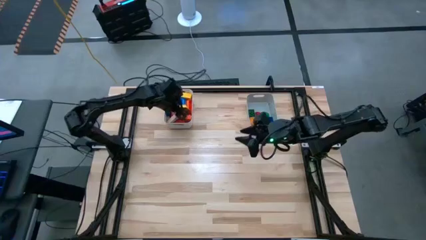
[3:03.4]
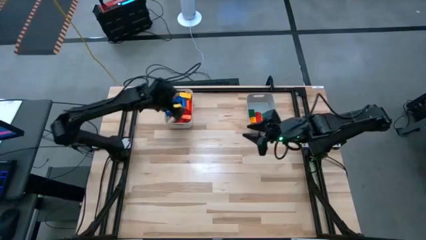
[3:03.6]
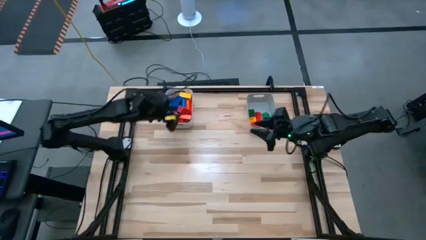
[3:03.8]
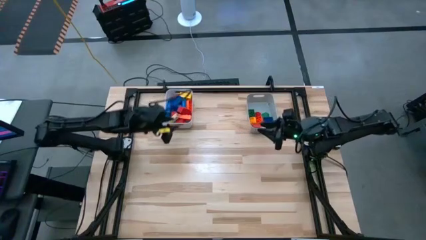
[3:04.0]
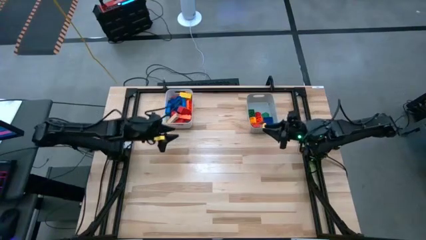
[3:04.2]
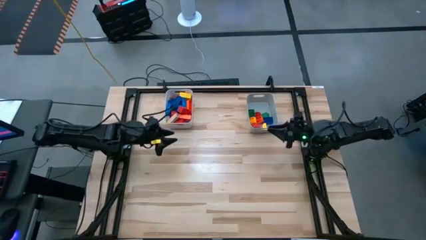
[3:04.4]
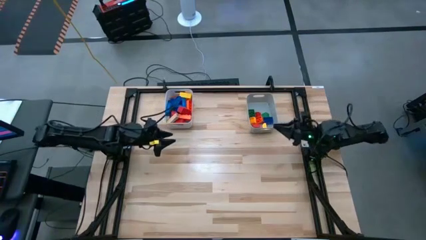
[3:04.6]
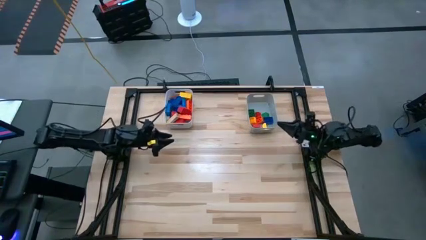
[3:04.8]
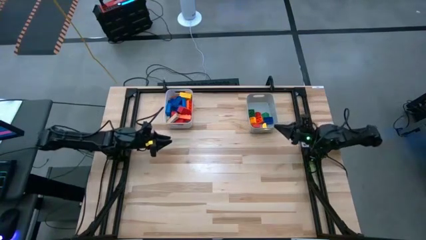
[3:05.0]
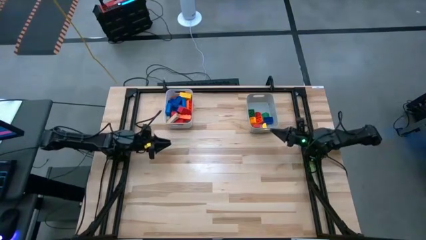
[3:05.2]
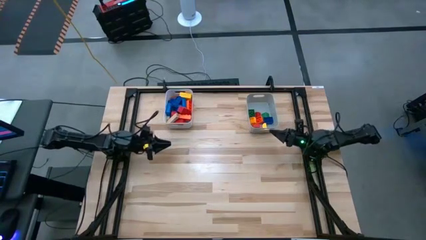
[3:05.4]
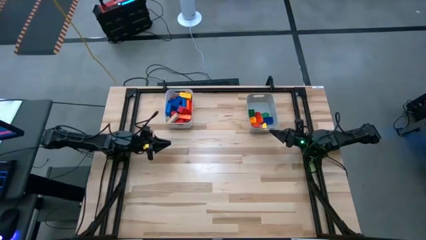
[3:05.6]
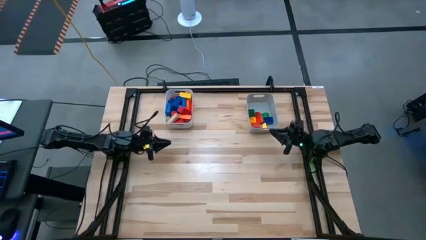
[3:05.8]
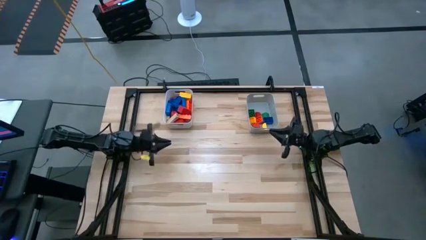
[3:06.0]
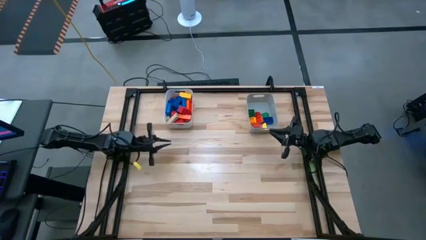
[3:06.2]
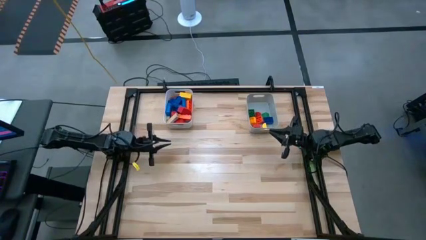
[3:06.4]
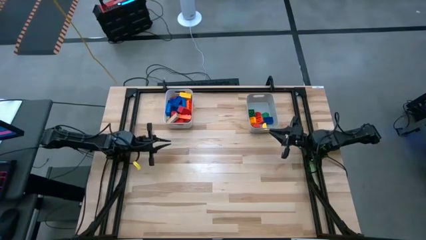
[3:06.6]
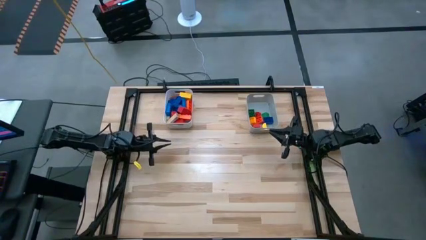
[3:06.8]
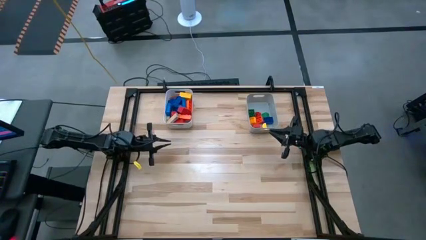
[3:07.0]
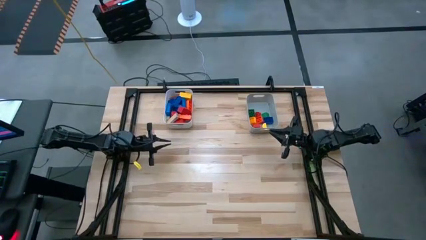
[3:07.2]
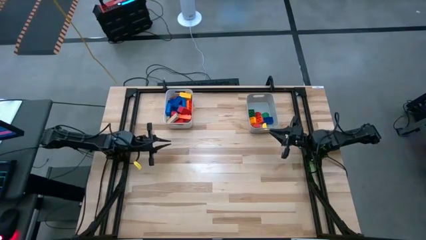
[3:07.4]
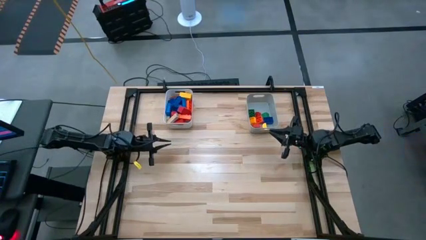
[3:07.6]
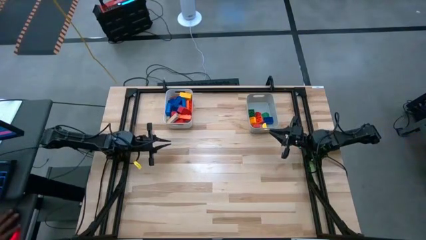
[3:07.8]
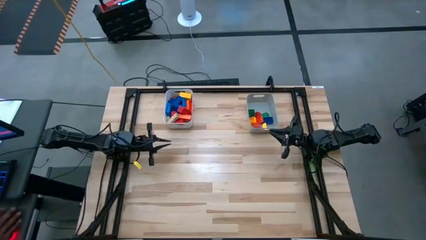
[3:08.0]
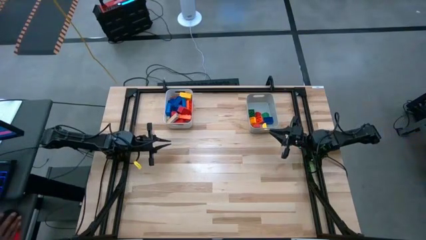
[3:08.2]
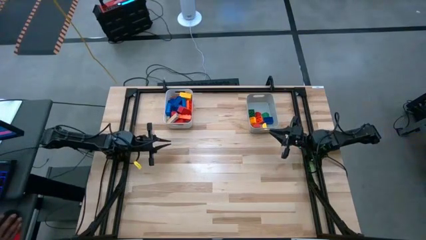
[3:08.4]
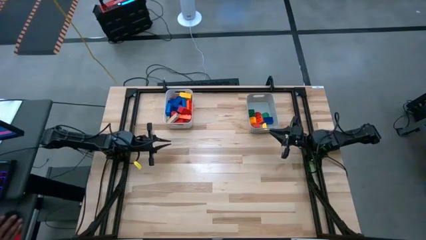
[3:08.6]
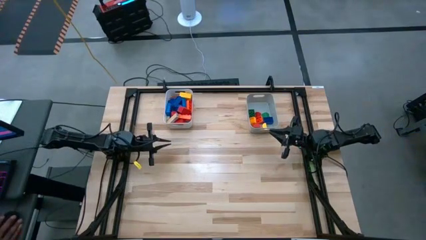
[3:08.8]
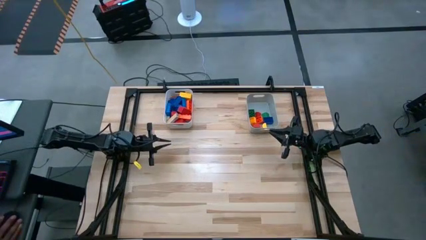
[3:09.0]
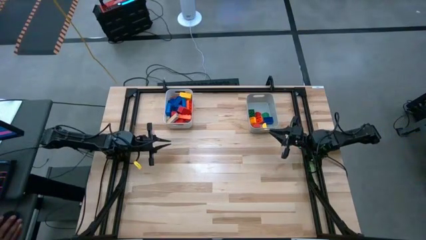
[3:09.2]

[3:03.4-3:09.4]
Task: Sort blocks by size
Return to Home Position

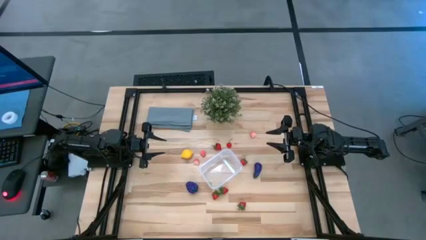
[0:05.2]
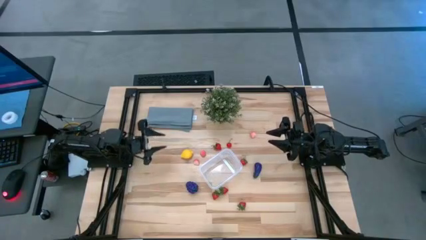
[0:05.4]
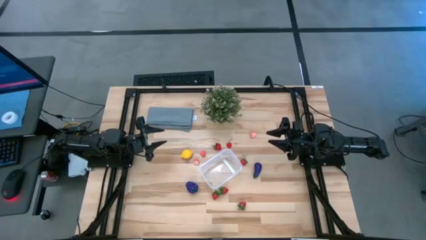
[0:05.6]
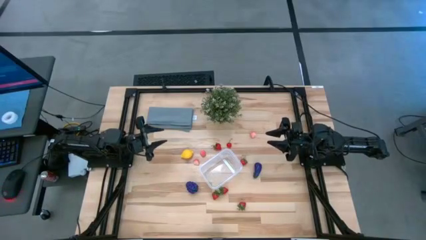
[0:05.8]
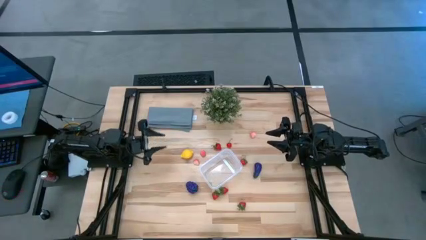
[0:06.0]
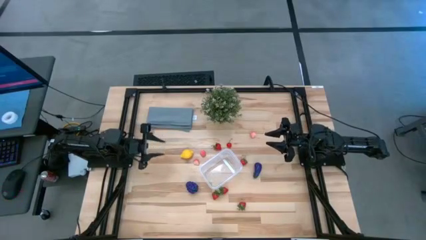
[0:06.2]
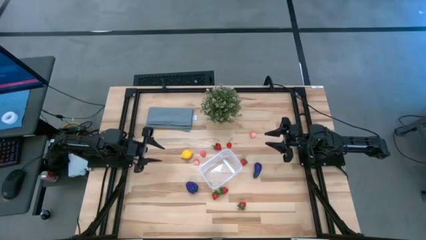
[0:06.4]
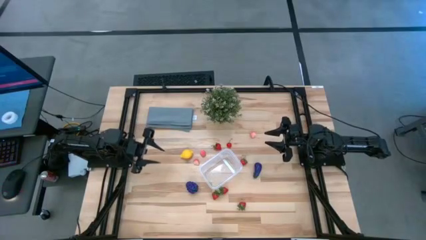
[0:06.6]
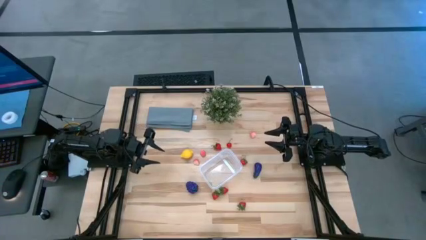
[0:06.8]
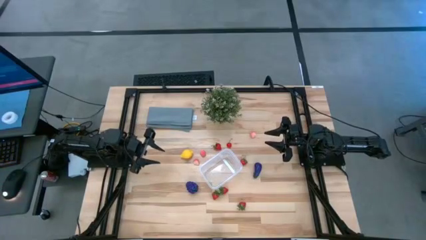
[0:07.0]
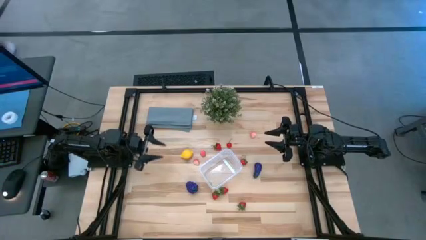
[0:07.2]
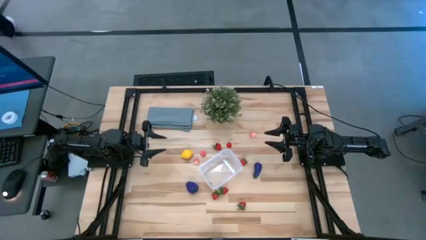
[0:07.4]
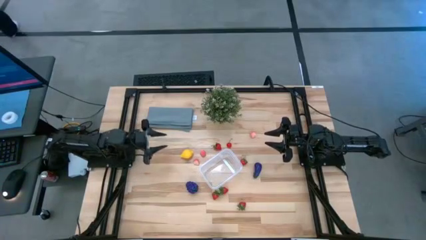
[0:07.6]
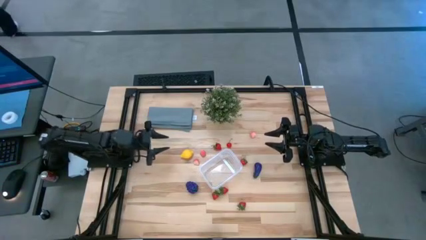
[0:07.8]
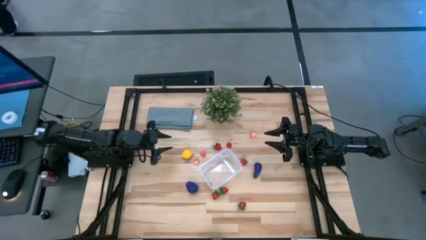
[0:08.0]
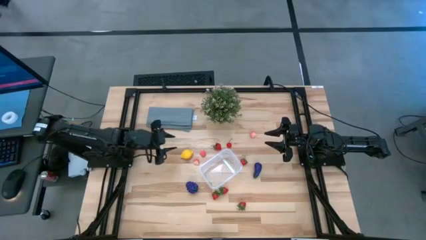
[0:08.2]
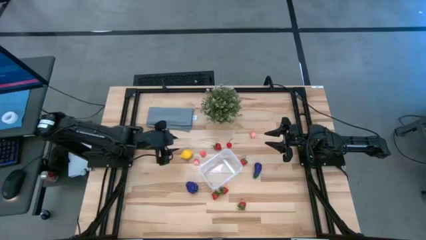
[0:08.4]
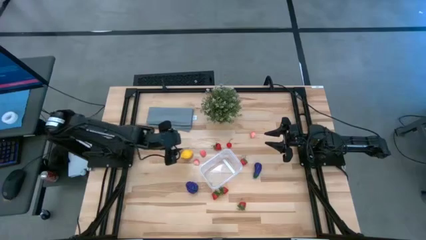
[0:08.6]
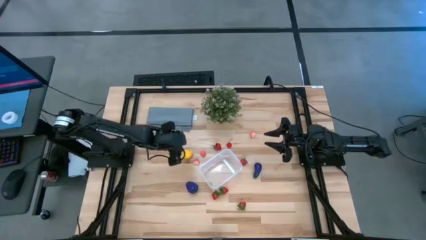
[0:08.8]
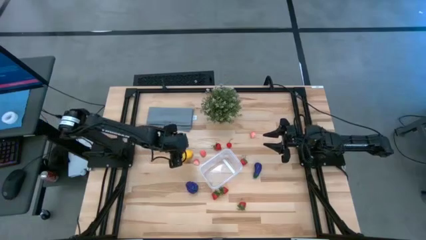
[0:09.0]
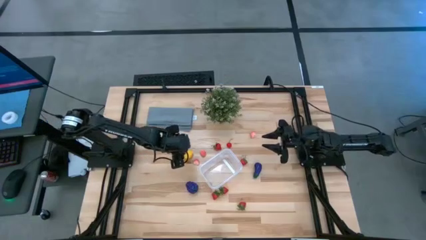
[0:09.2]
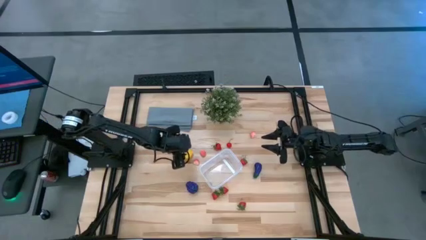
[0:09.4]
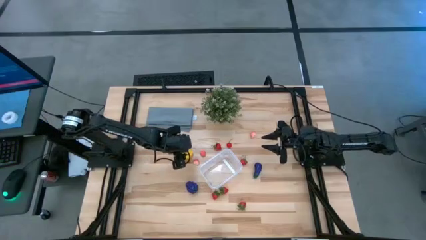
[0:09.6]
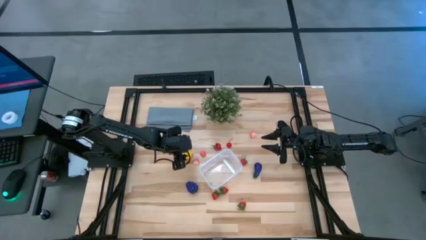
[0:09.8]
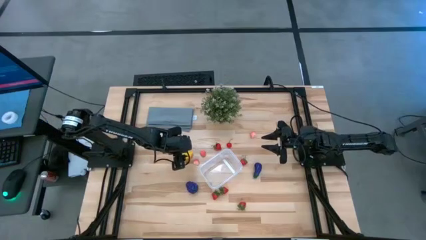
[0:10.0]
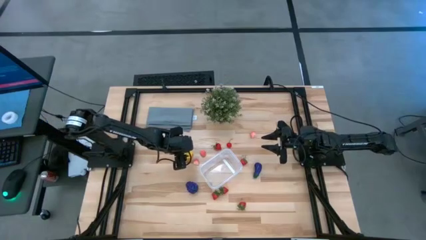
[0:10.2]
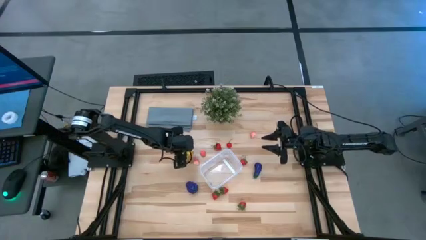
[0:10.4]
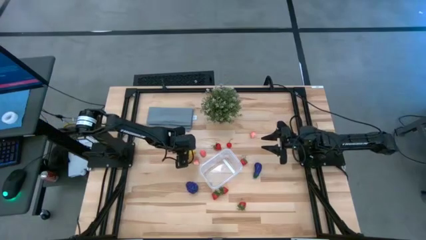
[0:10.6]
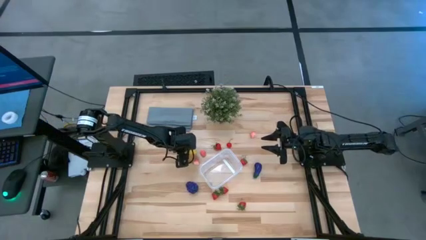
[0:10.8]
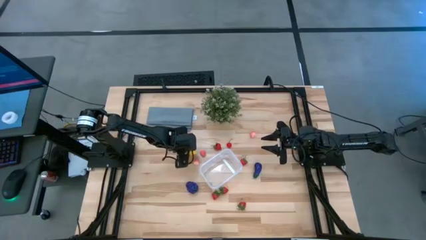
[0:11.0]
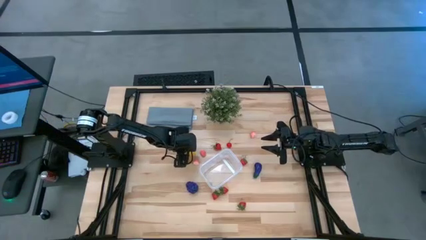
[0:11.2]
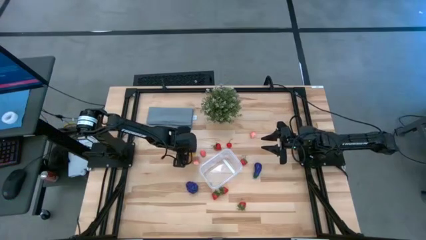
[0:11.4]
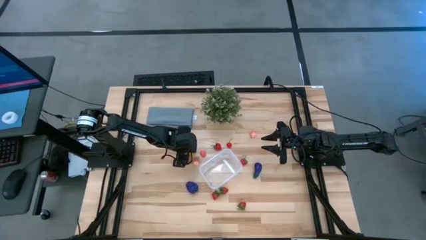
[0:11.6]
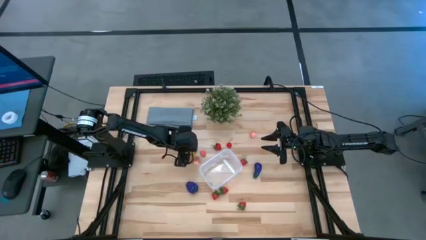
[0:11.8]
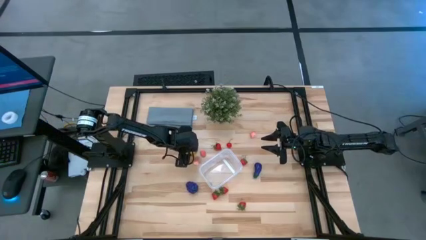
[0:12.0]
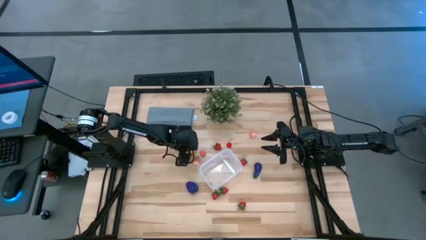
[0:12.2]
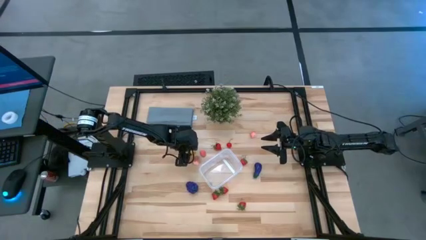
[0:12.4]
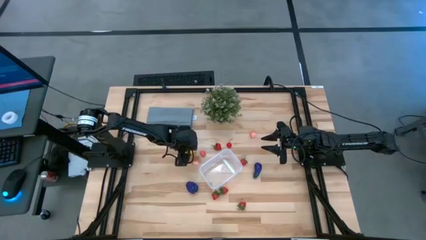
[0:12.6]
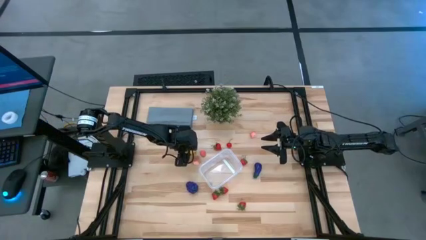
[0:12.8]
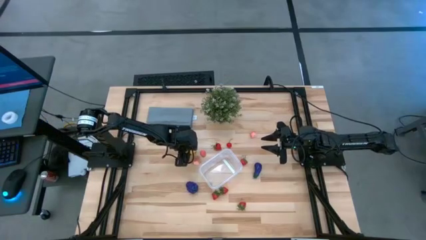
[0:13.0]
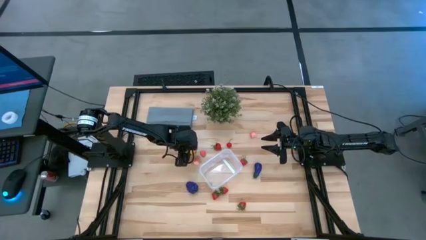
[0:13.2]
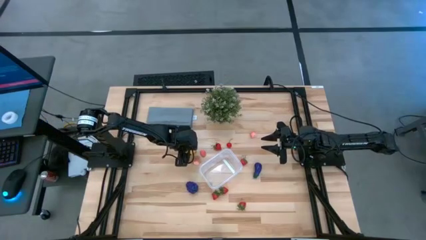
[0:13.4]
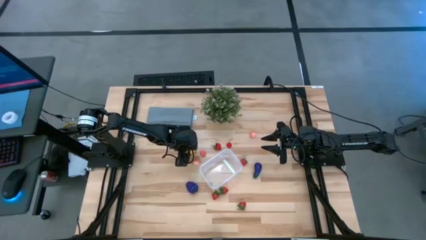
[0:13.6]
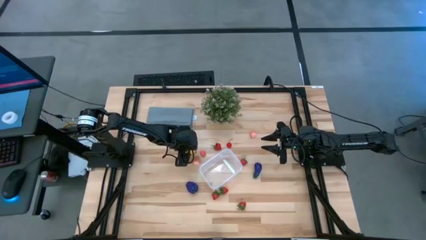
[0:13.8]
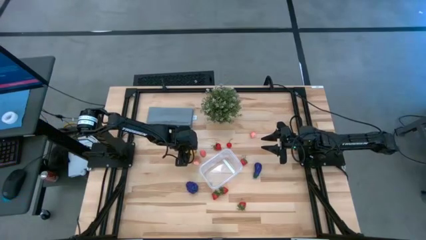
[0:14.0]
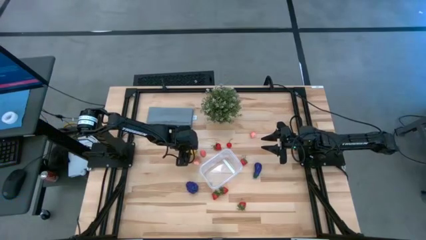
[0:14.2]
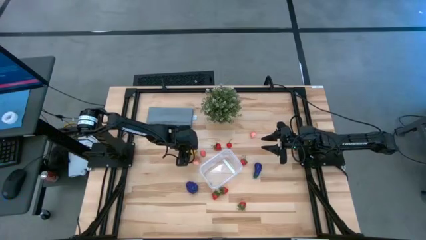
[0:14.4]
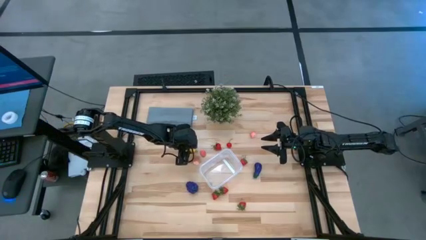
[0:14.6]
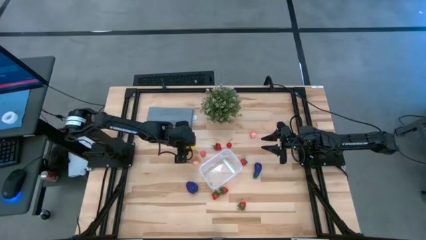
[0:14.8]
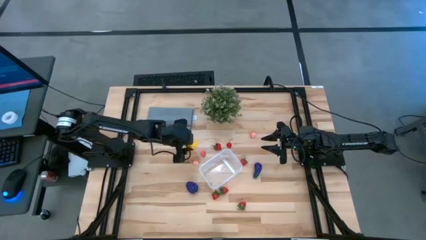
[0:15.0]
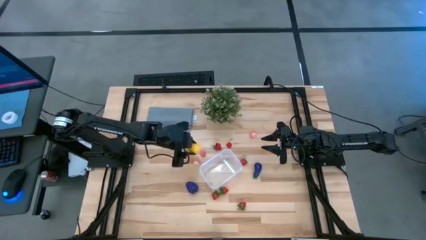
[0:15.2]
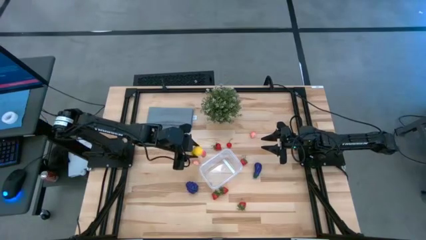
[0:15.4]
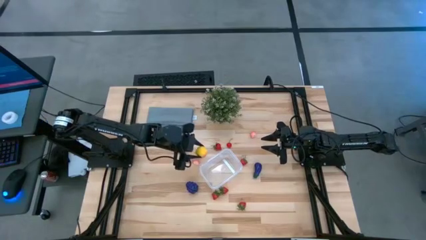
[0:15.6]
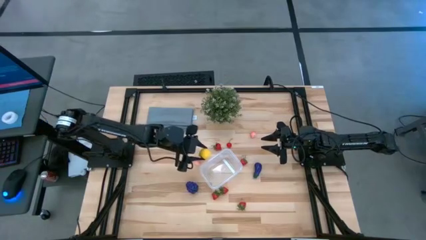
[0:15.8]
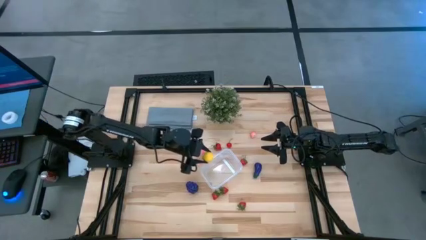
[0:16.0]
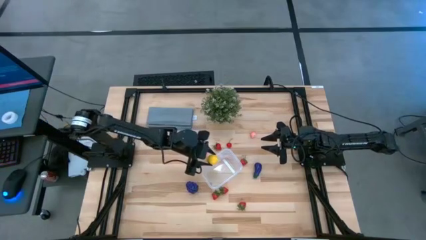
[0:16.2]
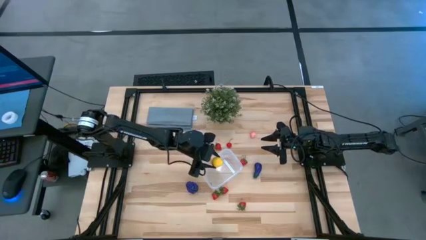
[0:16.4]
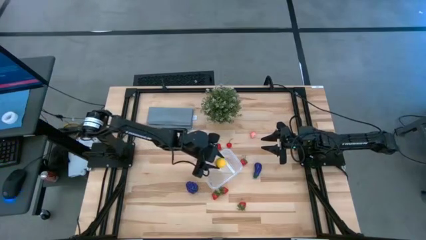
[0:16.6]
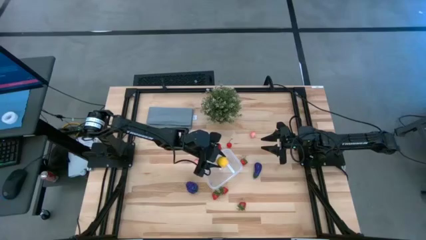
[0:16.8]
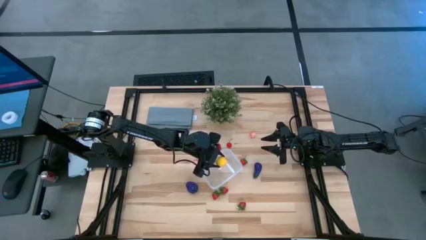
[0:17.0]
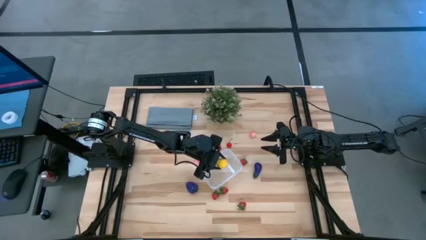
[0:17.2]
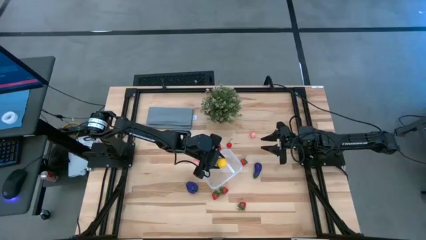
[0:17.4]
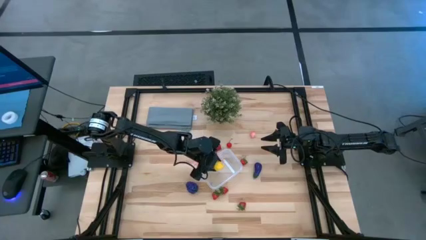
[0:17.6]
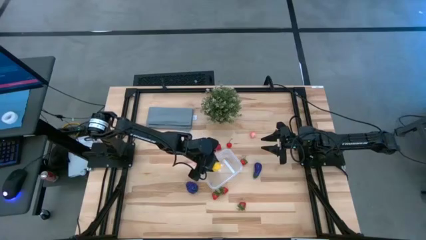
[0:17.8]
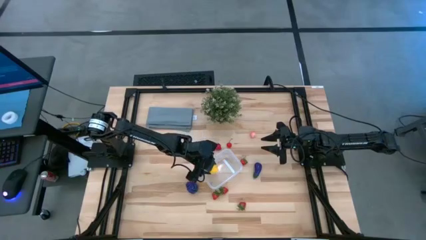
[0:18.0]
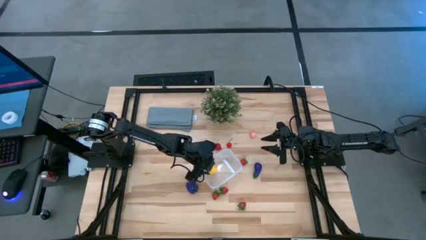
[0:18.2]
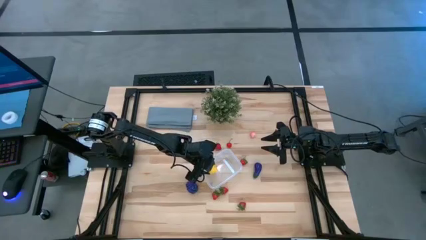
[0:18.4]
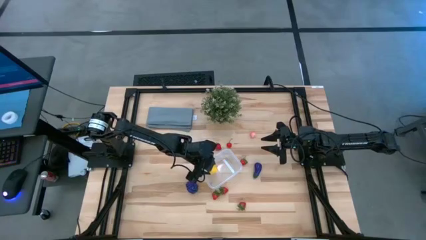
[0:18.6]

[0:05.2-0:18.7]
Task: Pick and placing Produce into tupperware
Put the lemon into the transparent bin
